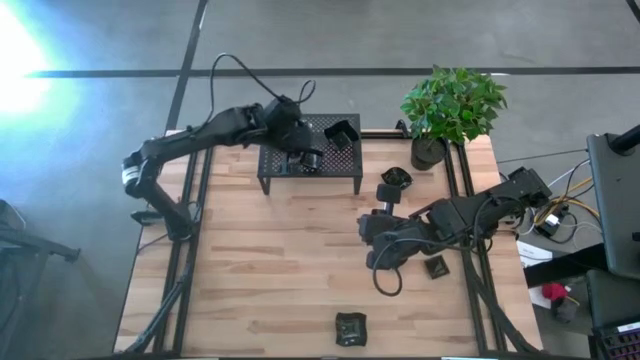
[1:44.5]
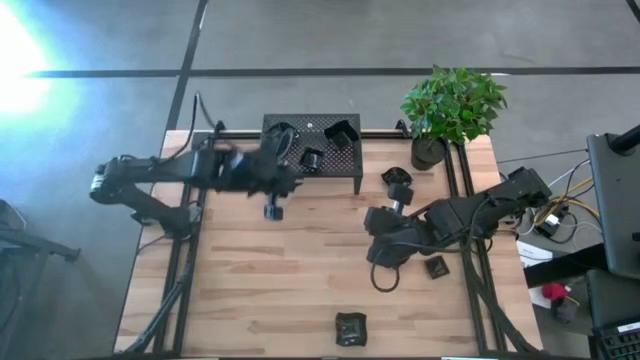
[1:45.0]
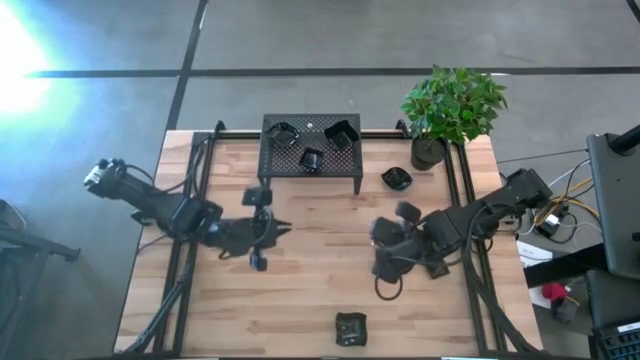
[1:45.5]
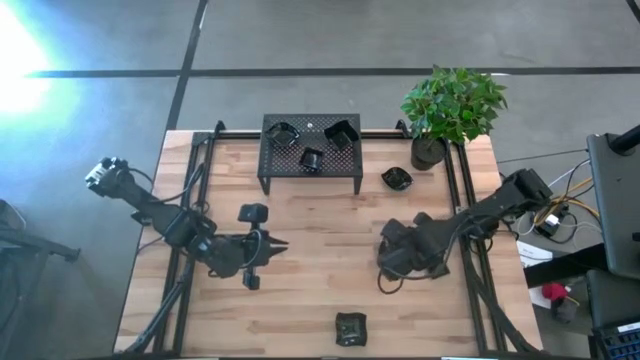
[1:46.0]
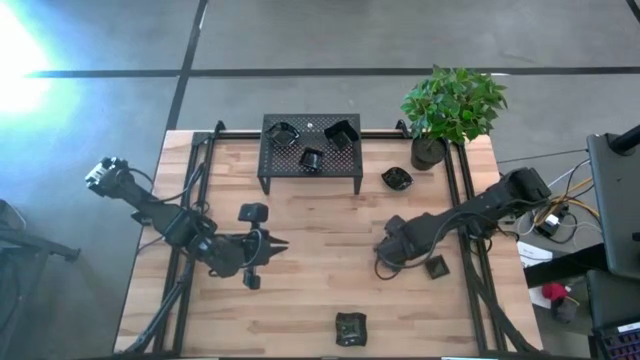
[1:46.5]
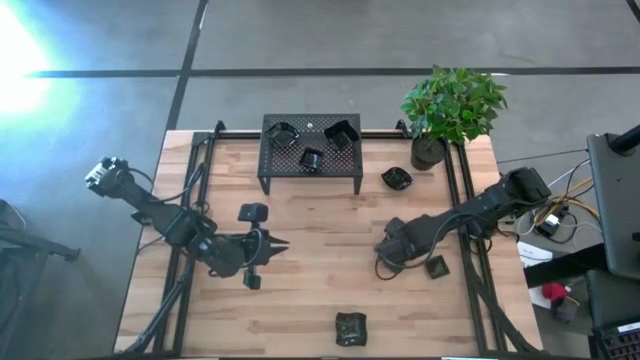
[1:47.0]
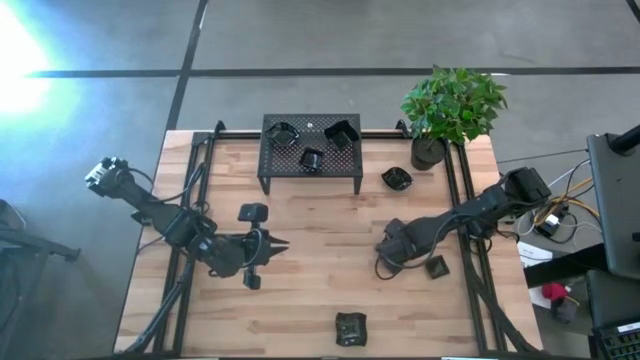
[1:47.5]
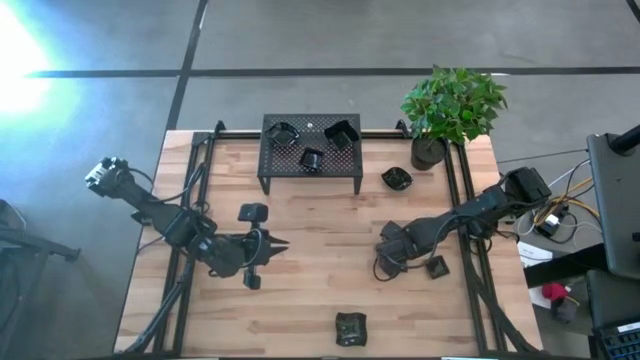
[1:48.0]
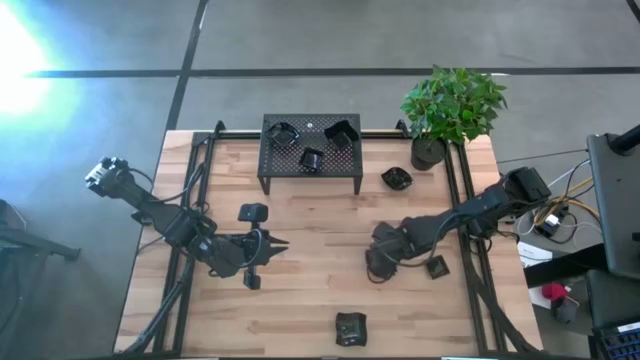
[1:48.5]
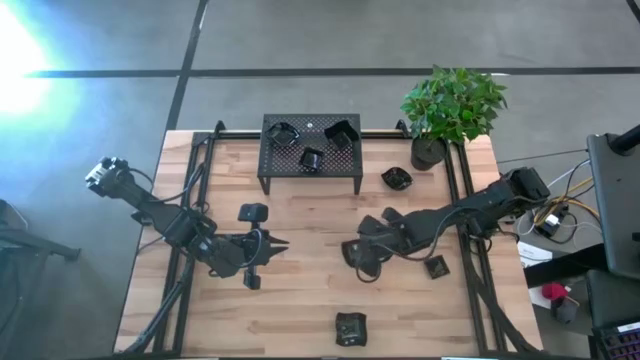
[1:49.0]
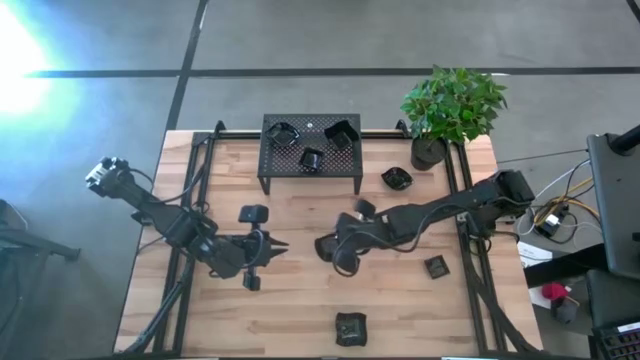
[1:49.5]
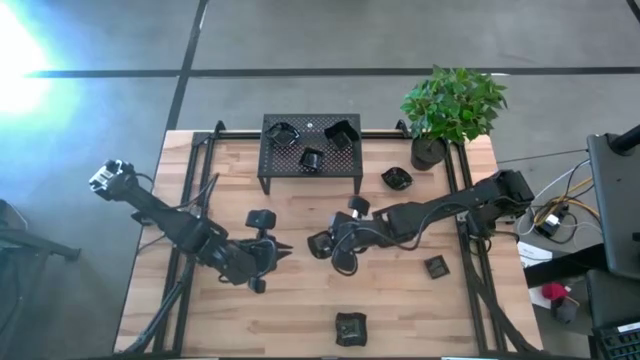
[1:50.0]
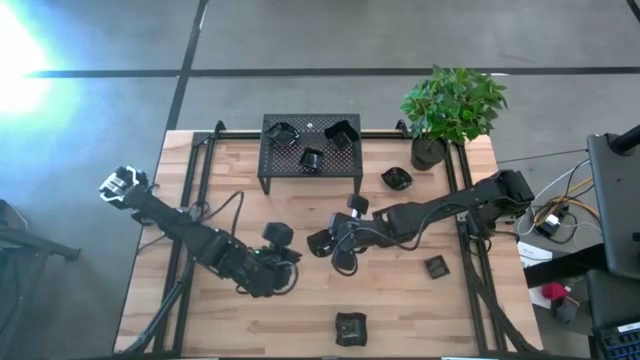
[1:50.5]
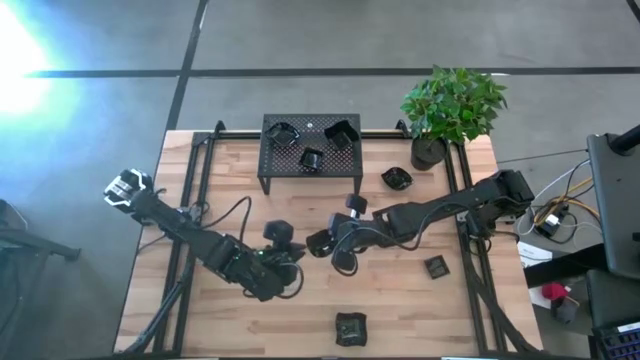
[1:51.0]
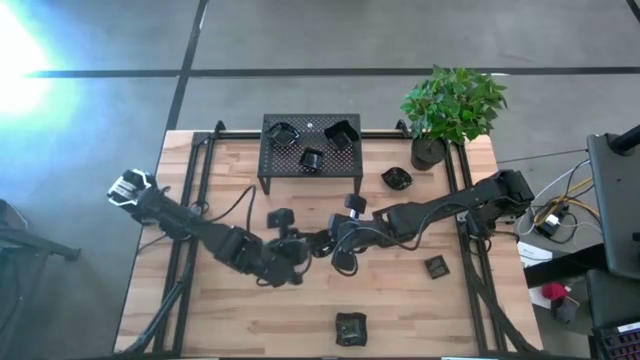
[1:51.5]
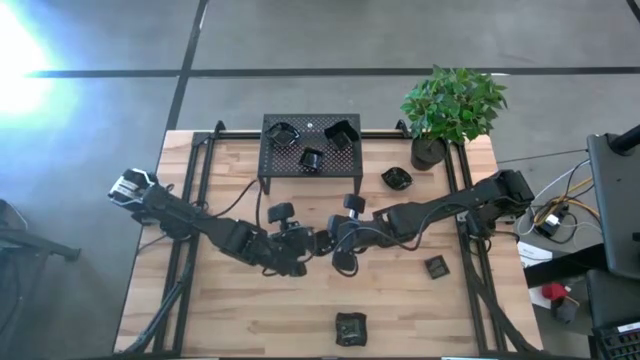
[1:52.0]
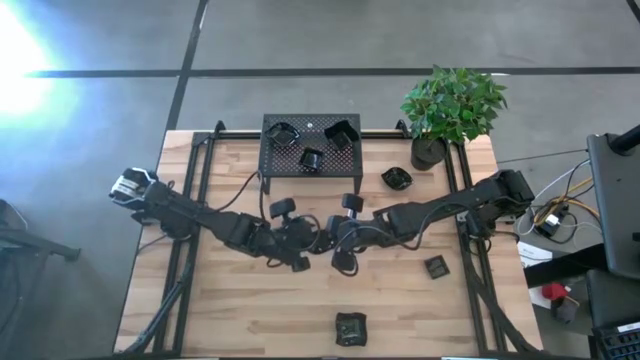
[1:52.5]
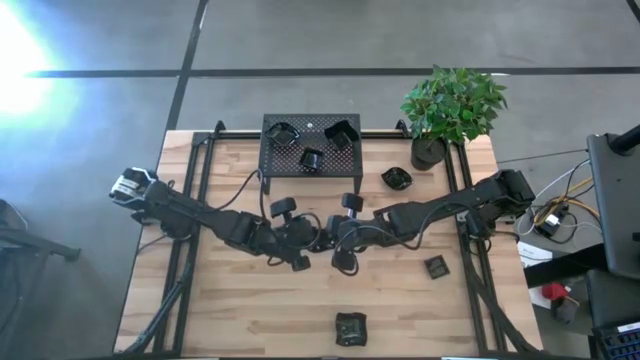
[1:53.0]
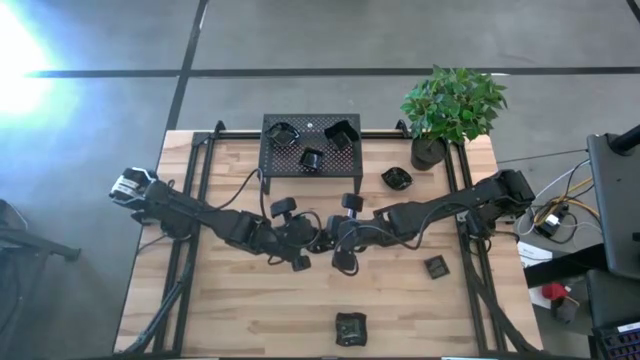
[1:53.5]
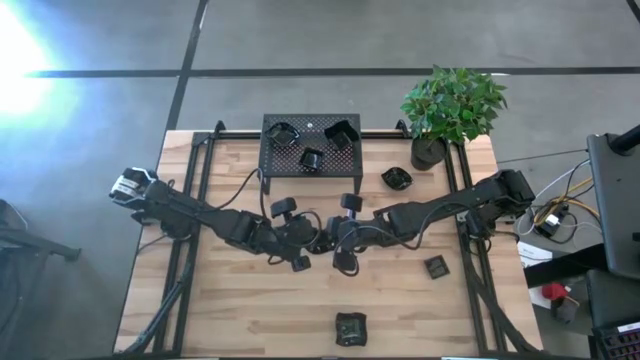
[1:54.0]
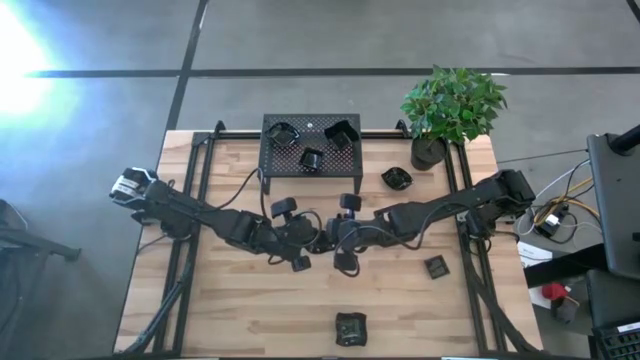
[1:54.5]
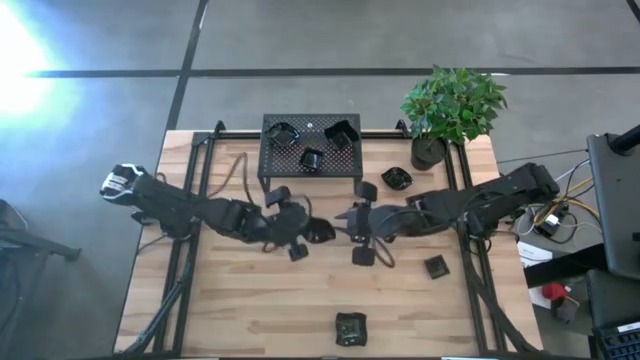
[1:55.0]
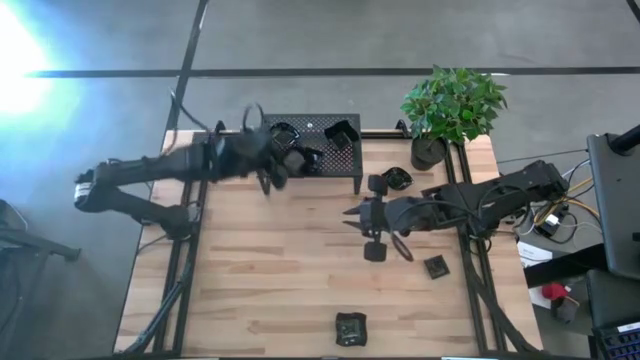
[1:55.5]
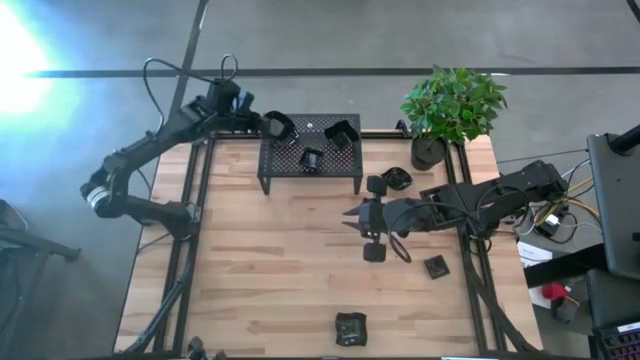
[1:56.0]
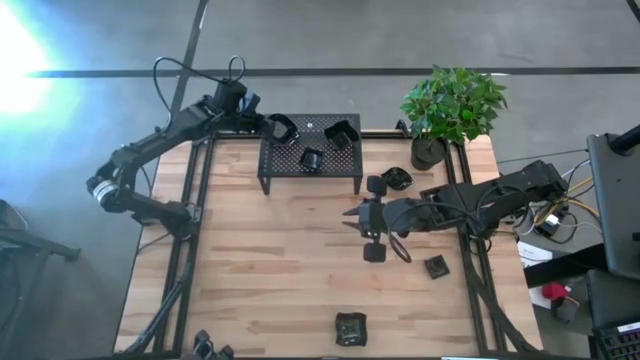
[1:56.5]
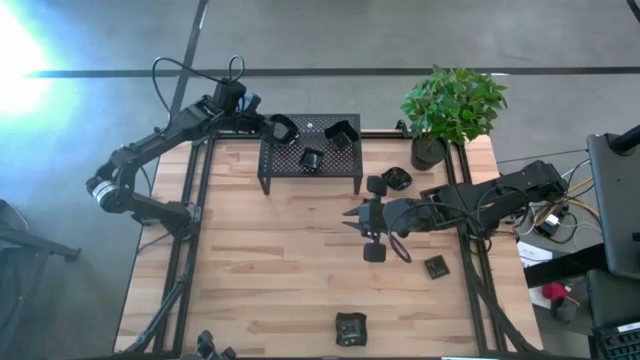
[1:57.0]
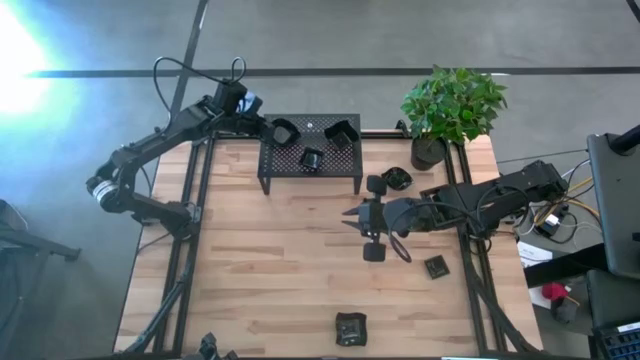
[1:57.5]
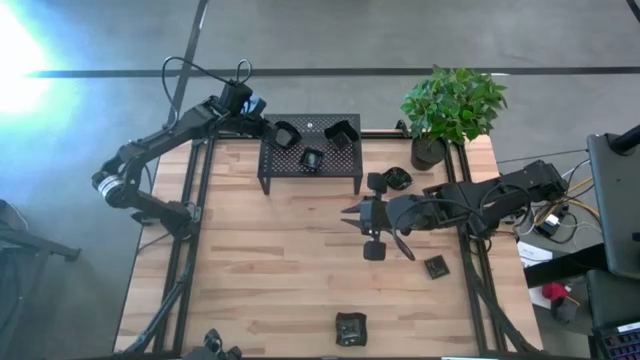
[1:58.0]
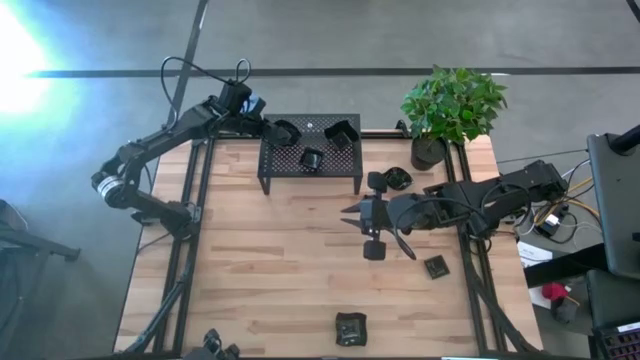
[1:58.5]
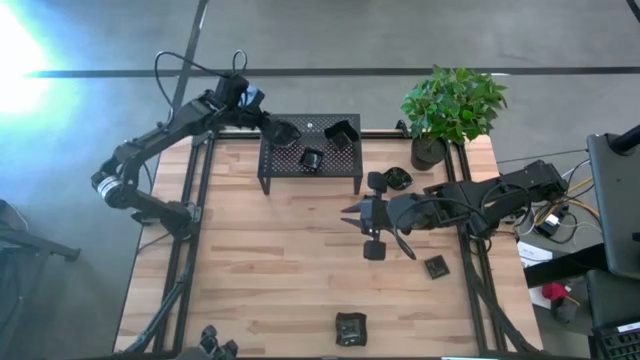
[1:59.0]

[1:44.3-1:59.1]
Task: Pick & Place Mini shaped plates
Stack the leaf shaped plate on top of the leaf shaped plates on the shelf

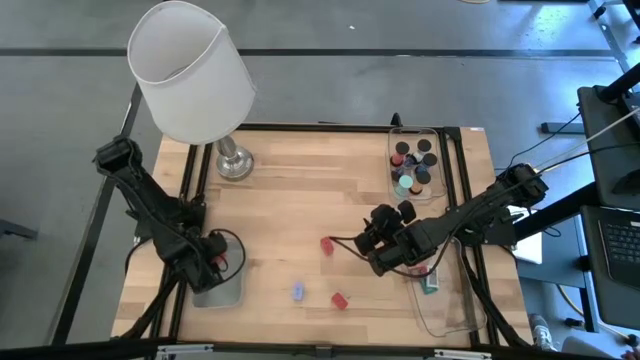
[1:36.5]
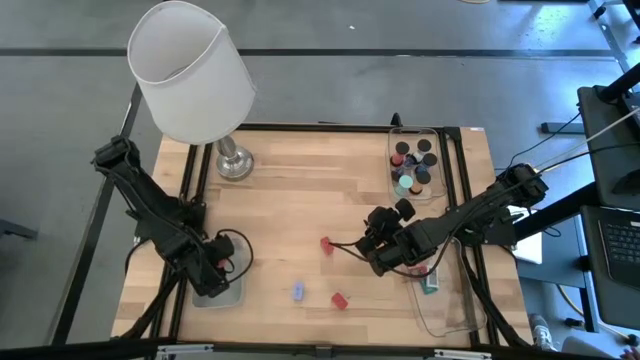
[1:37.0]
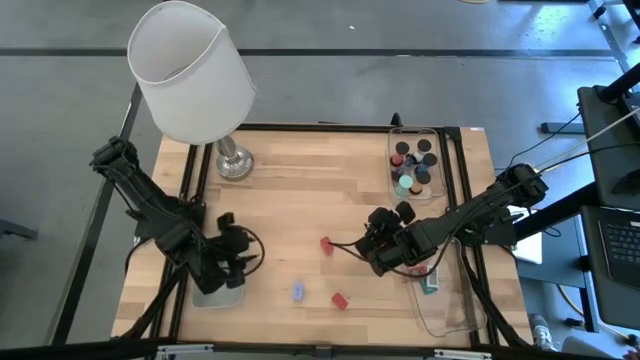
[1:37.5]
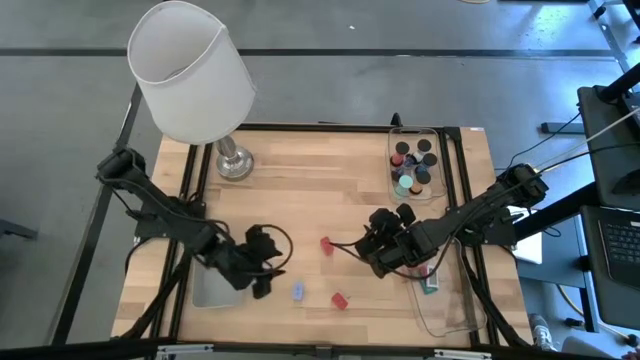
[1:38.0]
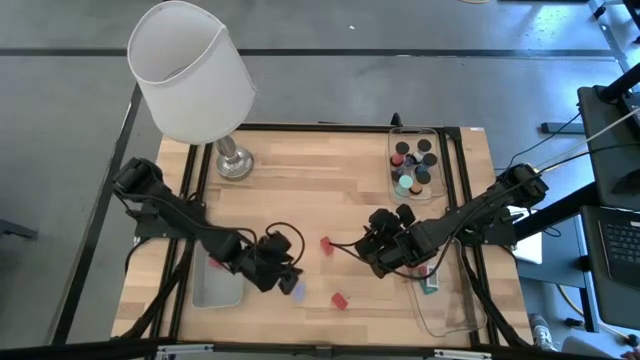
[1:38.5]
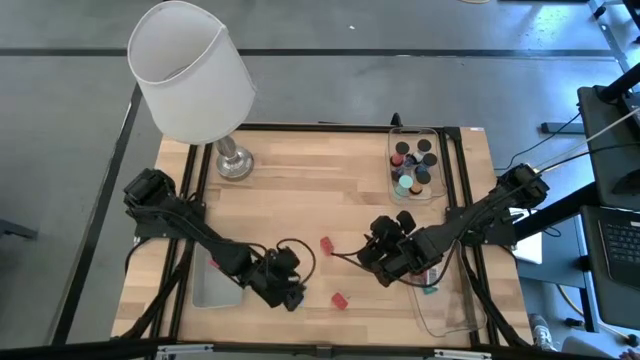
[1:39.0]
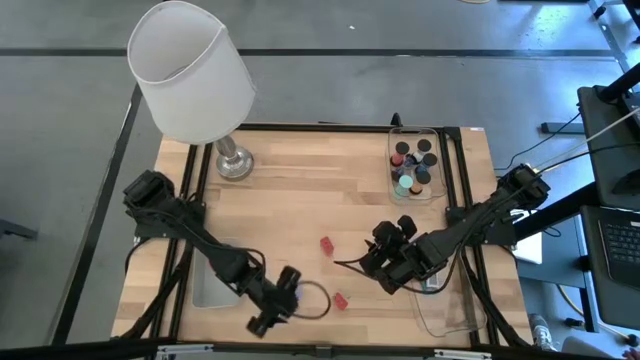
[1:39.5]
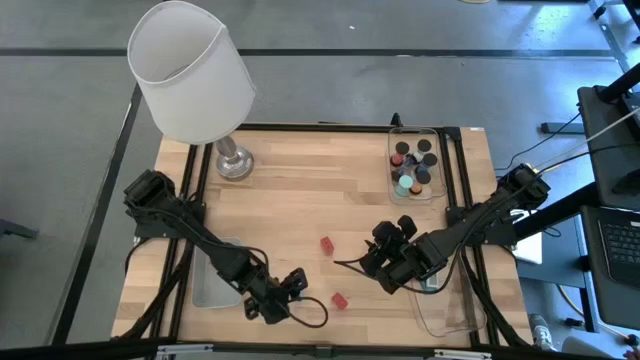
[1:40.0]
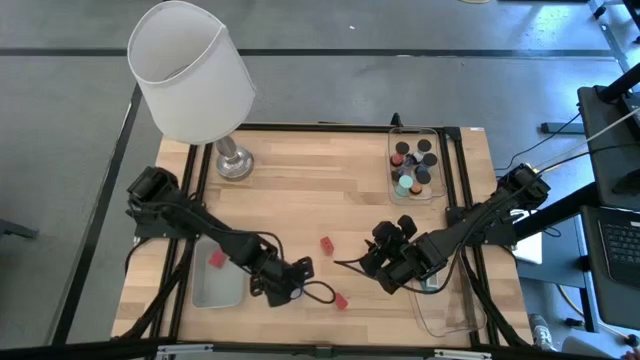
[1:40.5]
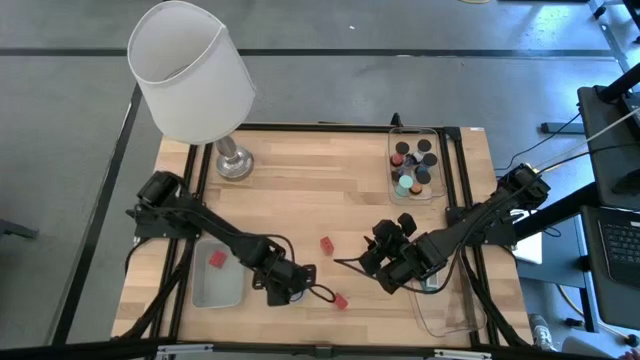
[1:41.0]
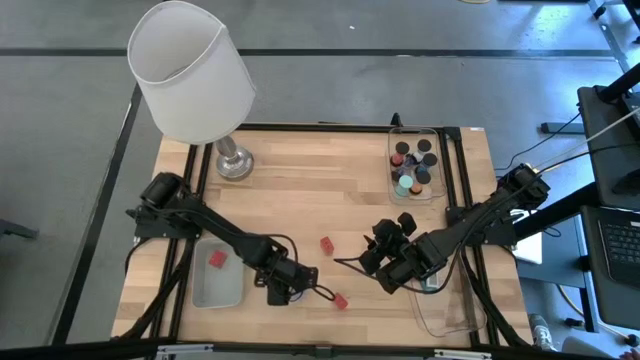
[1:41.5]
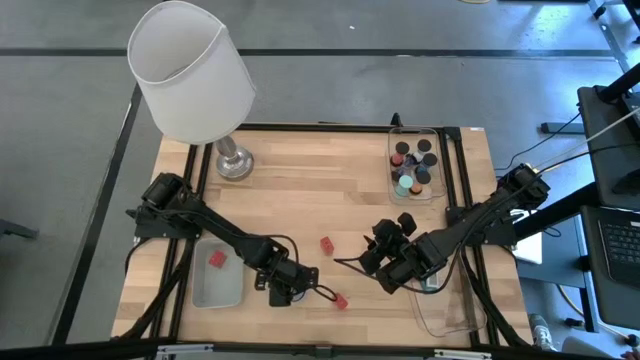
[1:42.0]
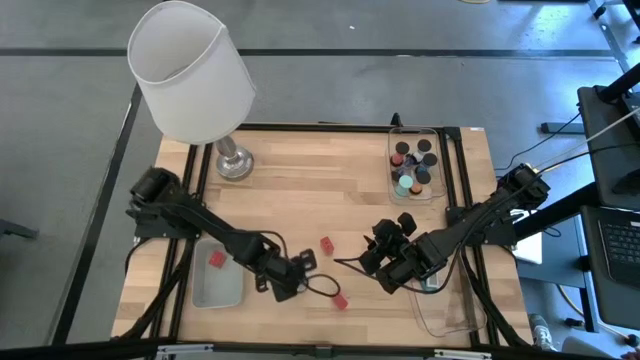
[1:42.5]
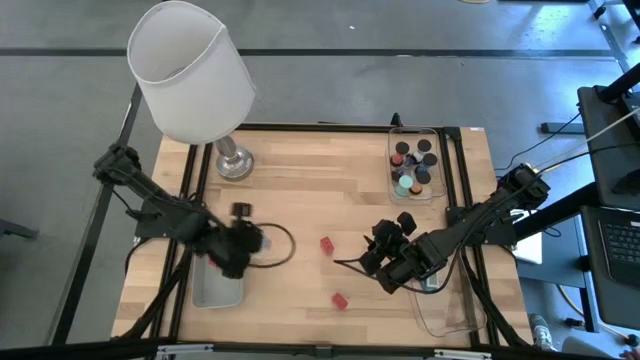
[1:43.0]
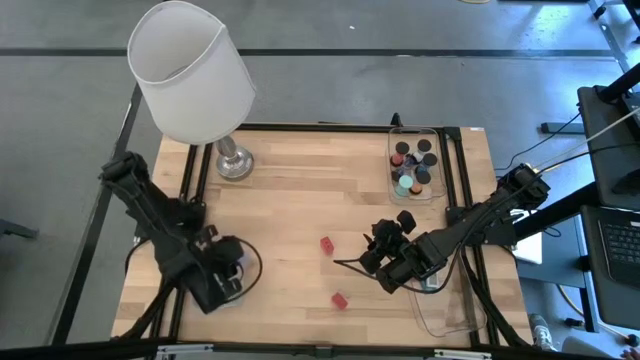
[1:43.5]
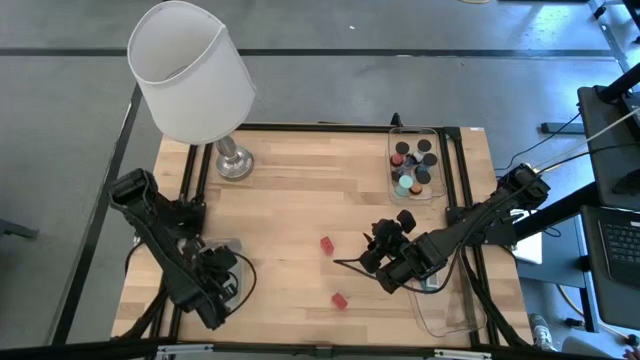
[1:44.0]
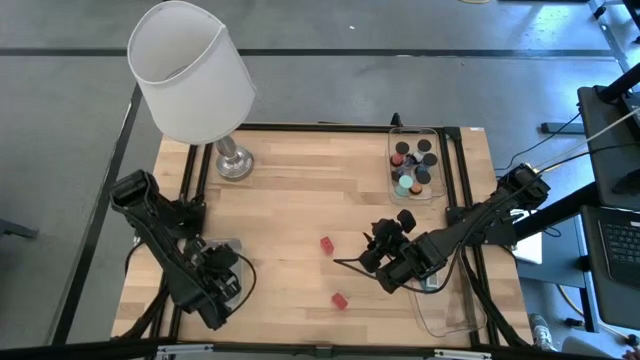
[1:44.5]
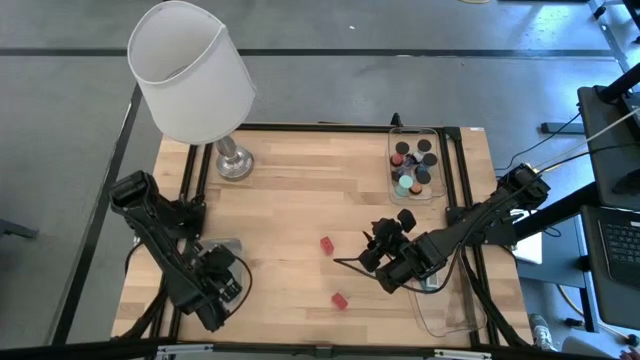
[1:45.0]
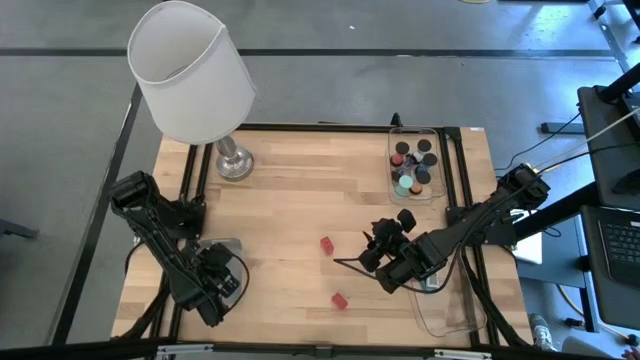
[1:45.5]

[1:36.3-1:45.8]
Task: Pick & Place Office items
Put the blue charger adapter into the white bin
